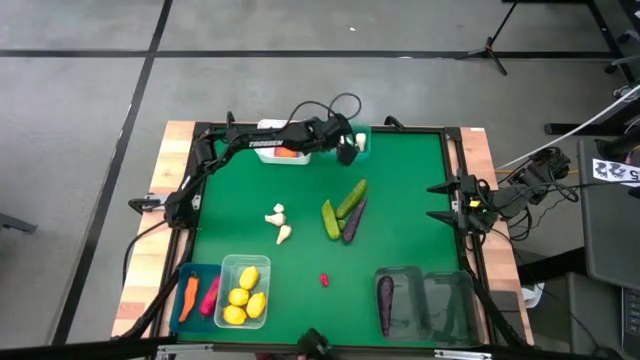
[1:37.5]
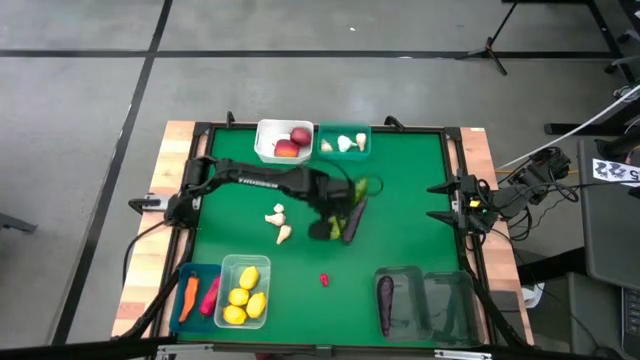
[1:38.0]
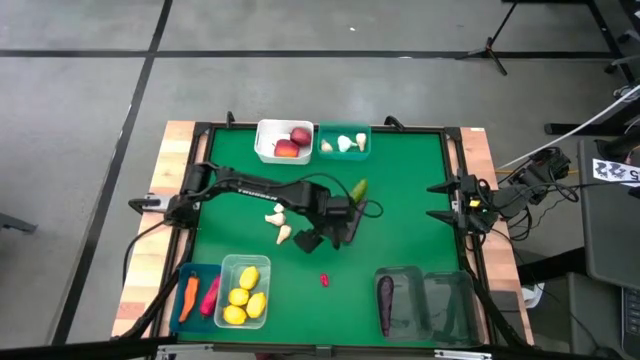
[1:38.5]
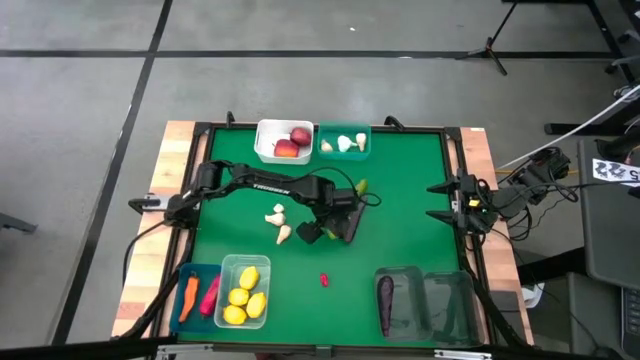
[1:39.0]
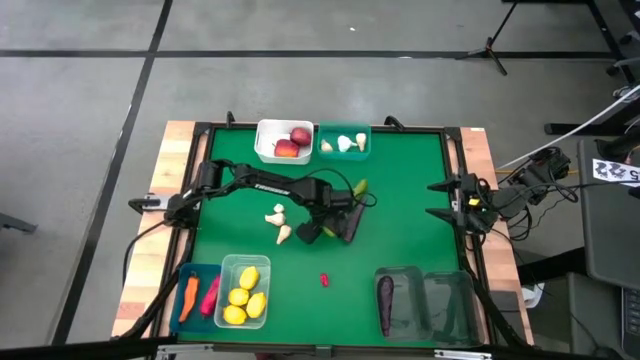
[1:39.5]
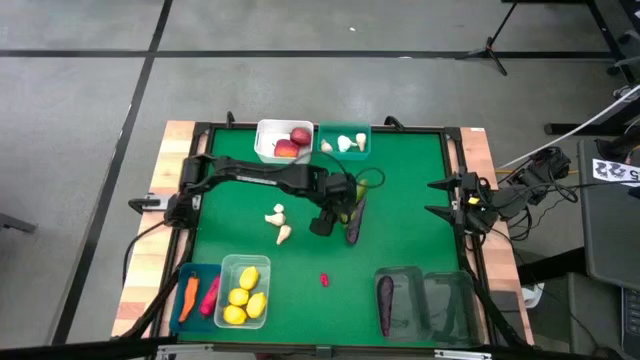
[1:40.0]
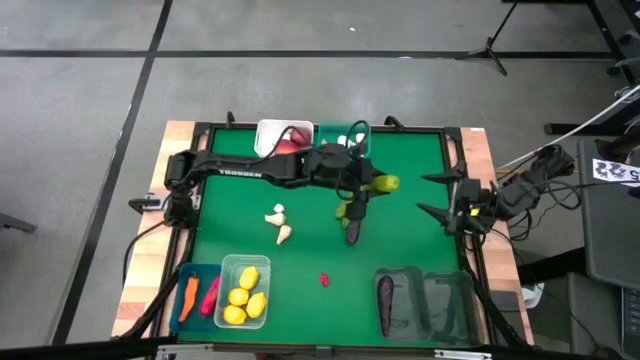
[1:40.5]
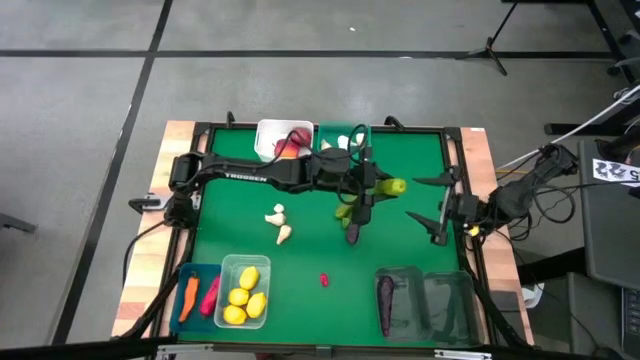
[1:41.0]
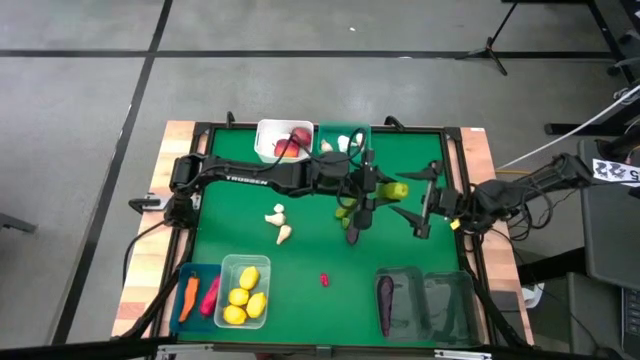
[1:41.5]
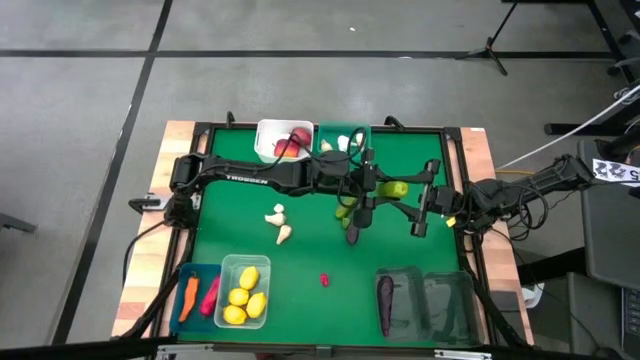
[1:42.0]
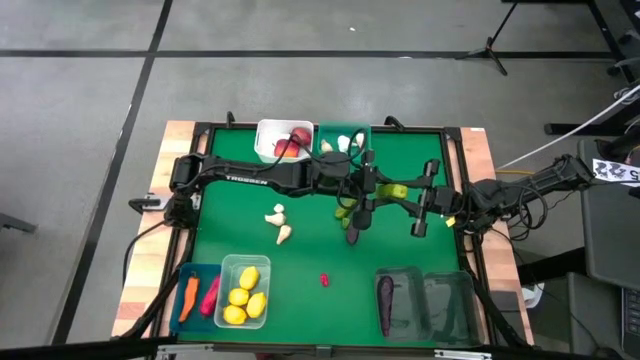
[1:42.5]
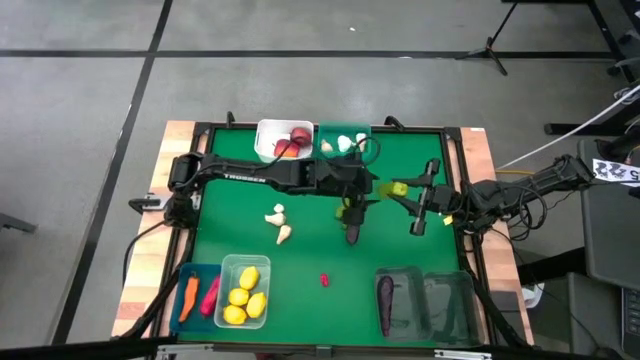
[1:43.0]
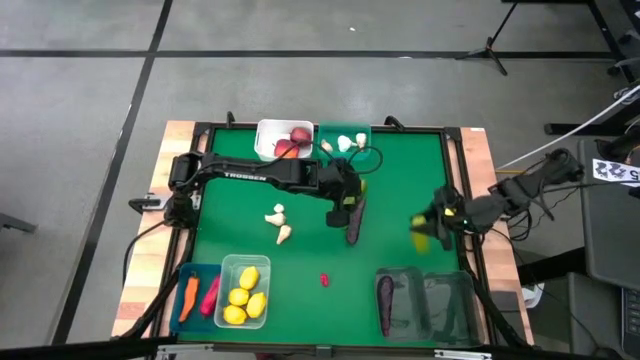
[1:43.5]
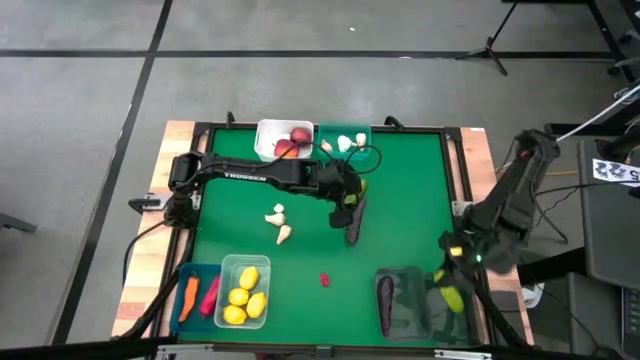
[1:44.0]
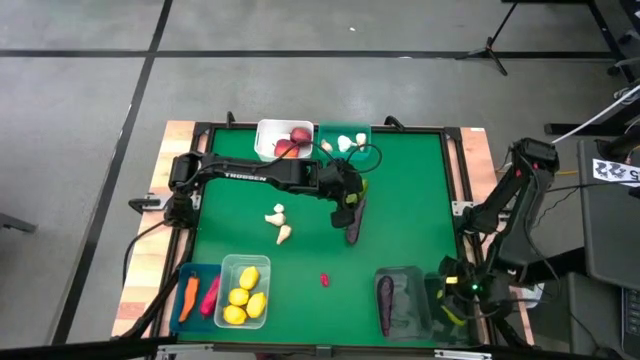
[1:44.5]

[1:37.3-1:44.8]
Task: Sort produce into baskets
Put the cucumber into the right black bin

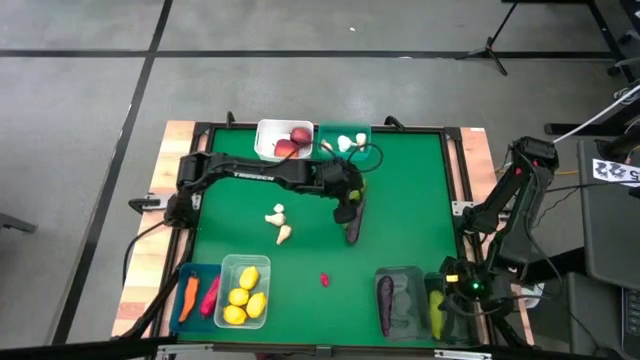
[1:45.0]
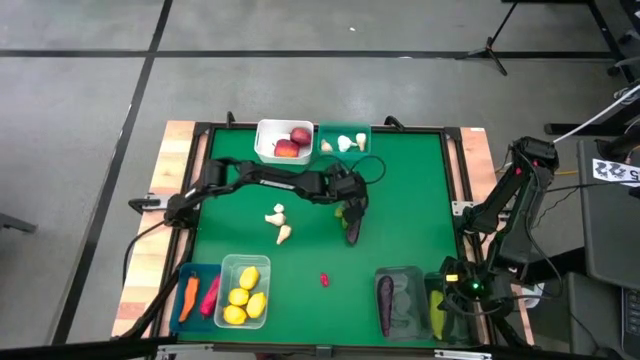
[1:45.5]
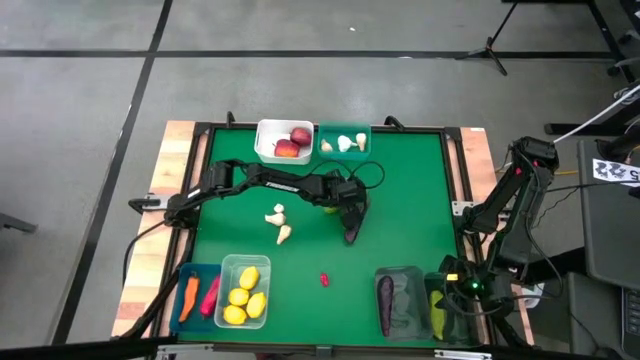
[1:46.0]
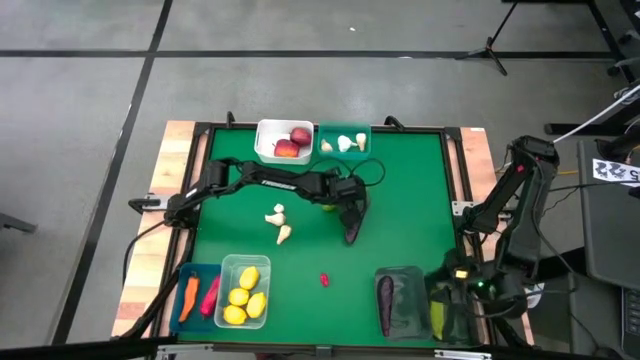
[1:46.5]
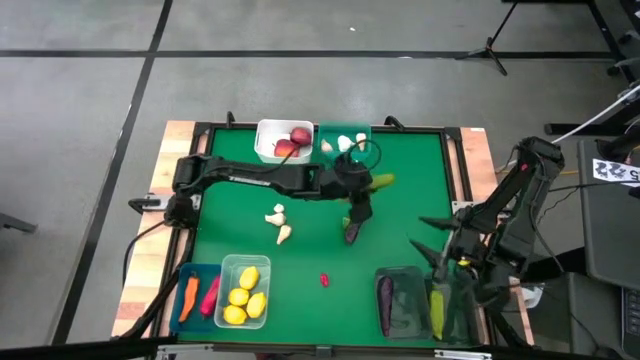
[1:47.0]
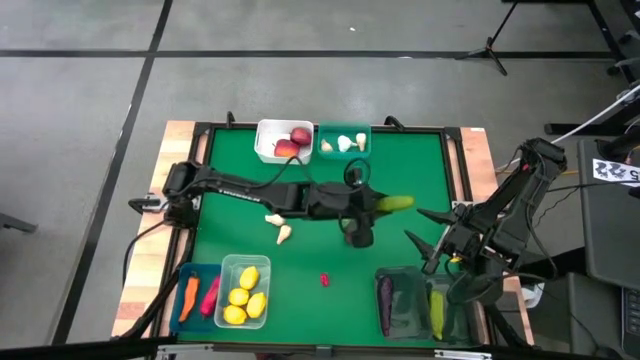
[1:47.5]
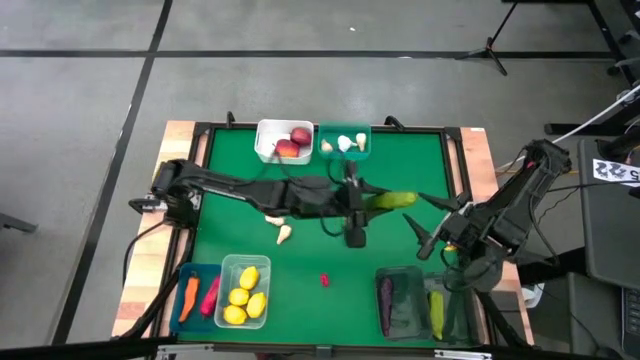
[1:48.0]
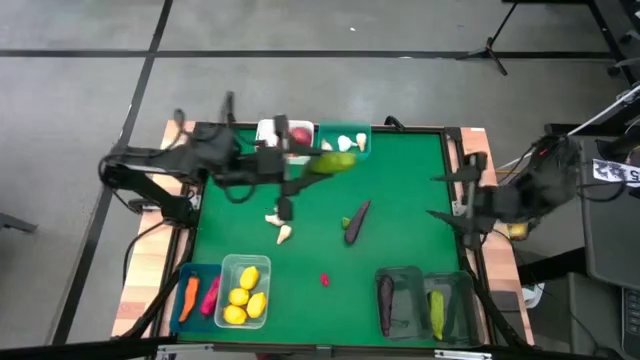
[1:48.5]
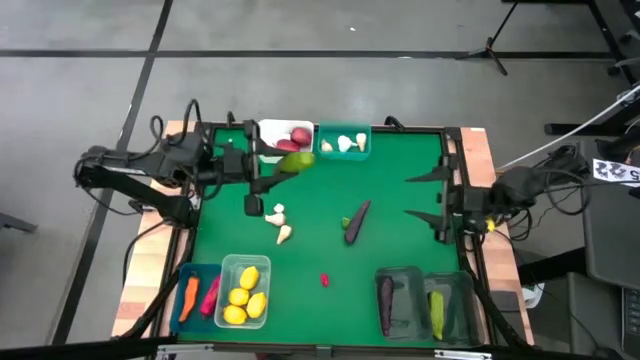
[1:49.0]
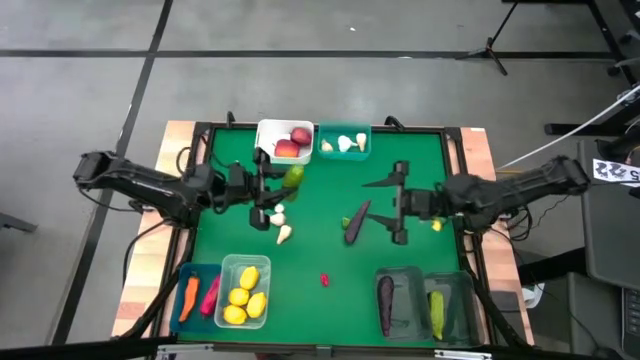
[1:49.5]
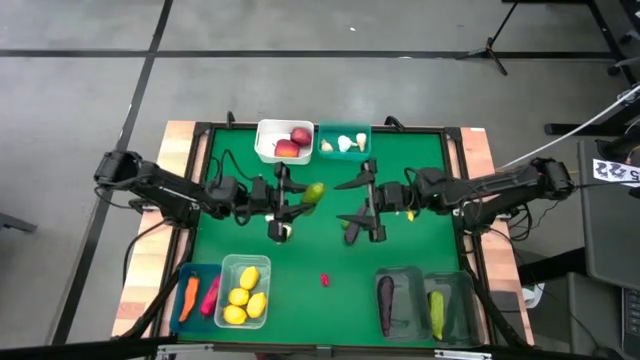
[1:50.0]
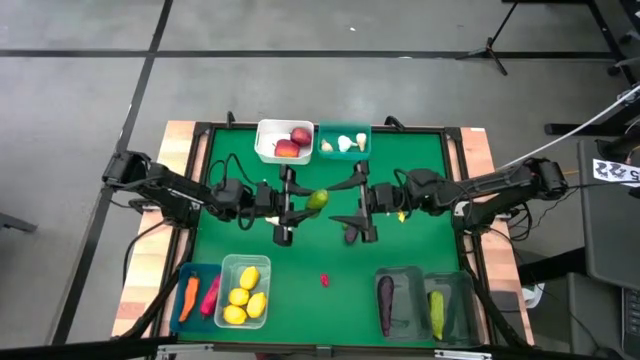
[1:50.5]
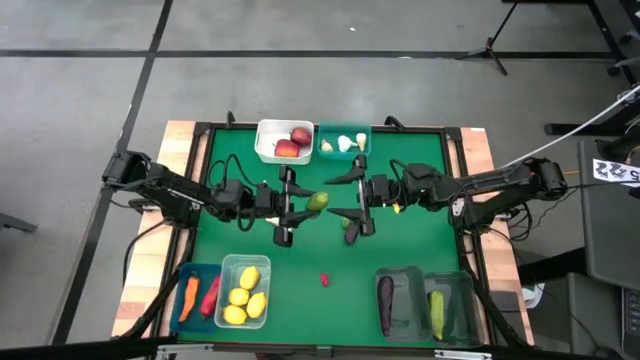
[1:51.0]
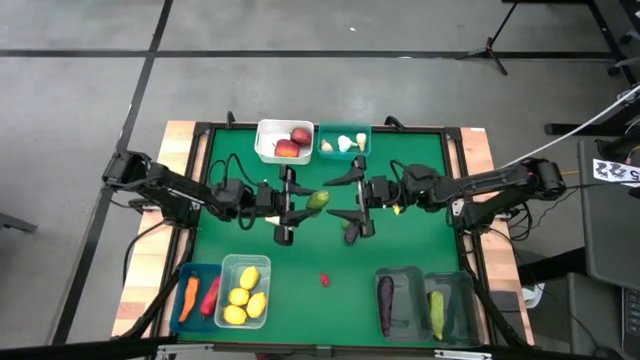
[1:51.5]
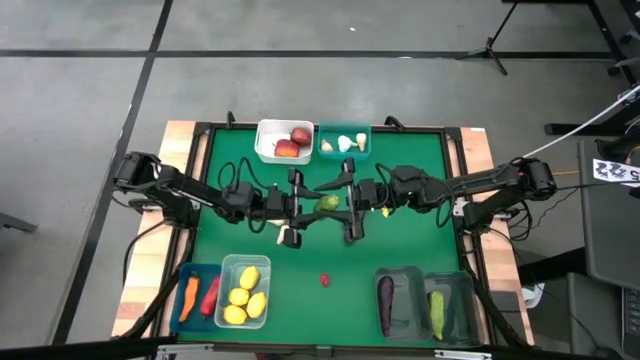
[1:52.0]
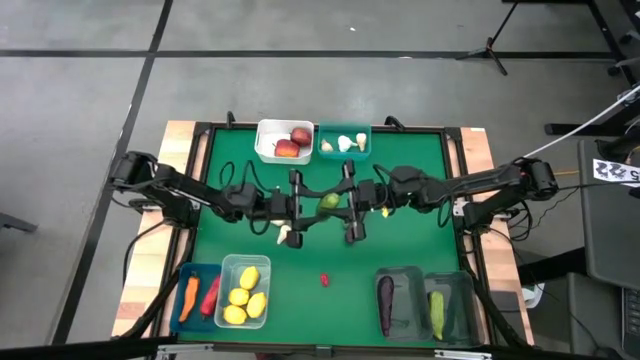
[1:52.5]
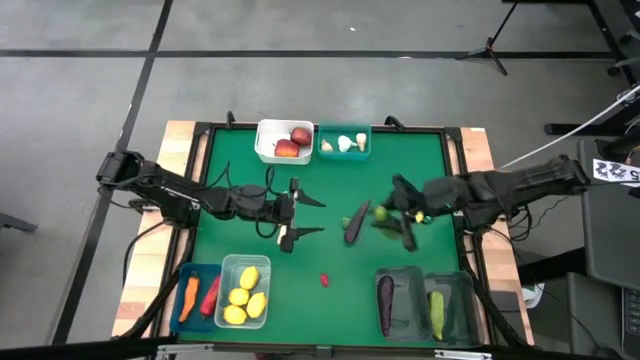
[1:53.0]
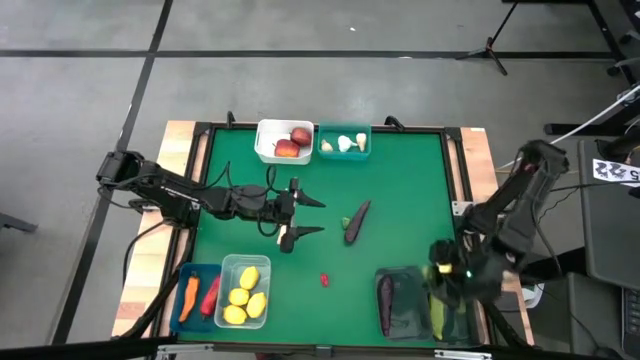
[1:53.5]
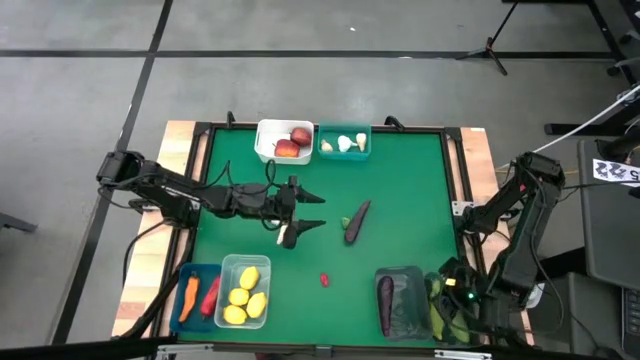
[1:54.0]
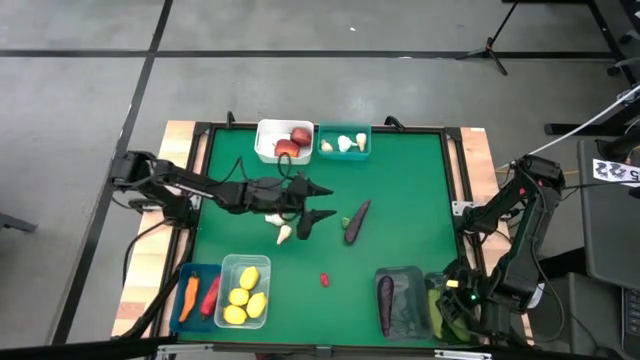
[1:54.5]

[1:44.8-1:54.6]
Put the cucumber into the right black bin

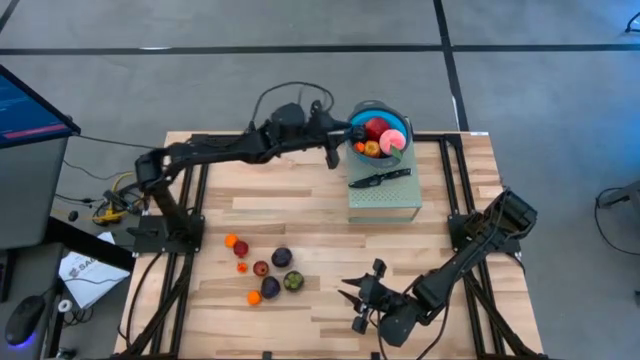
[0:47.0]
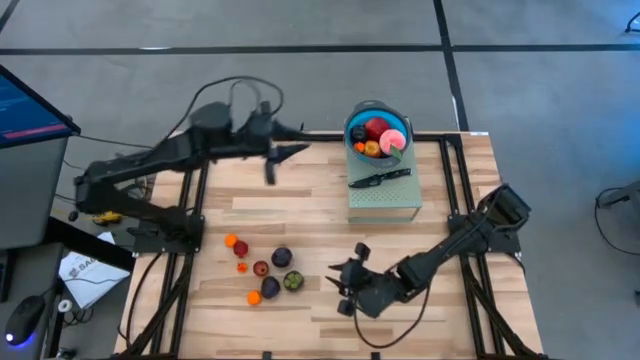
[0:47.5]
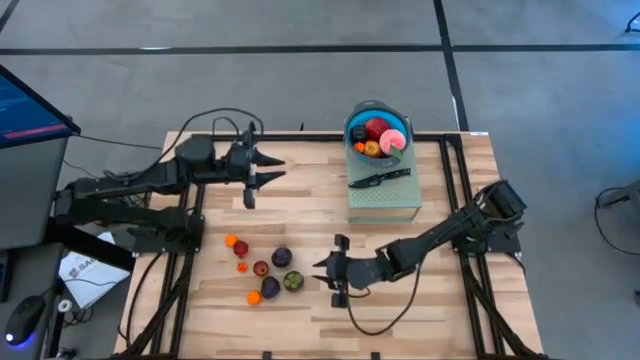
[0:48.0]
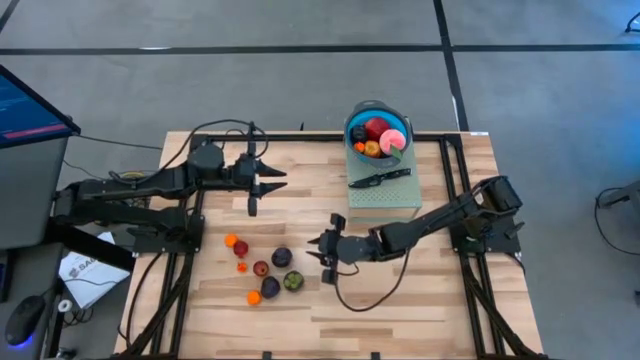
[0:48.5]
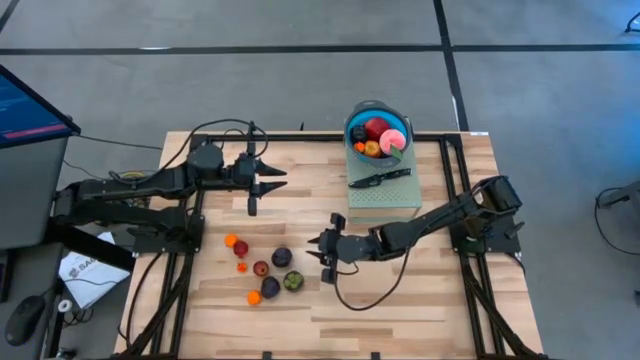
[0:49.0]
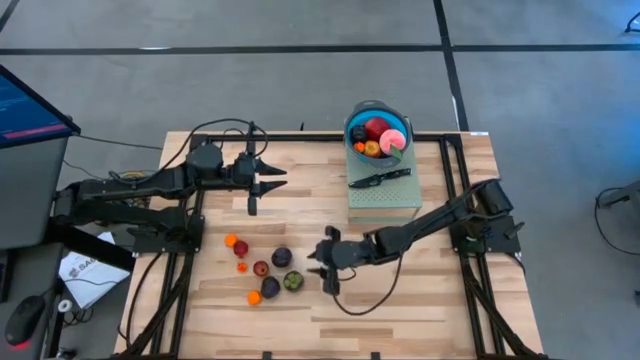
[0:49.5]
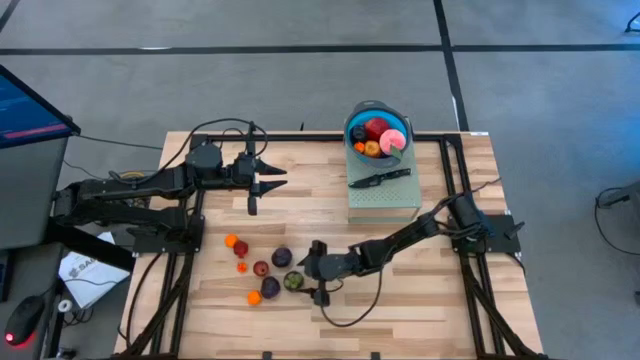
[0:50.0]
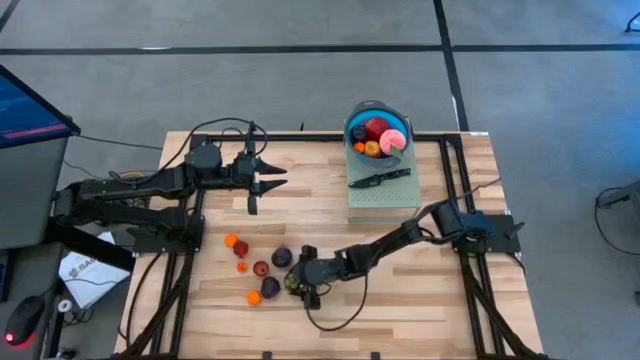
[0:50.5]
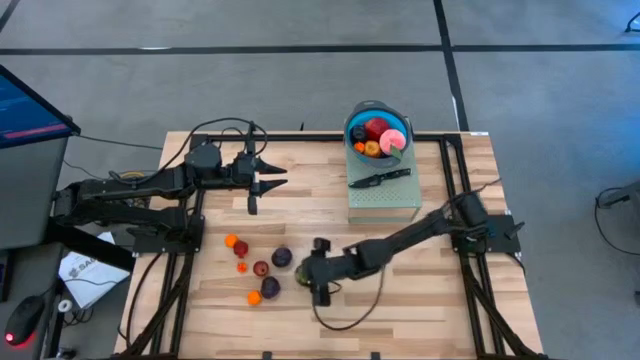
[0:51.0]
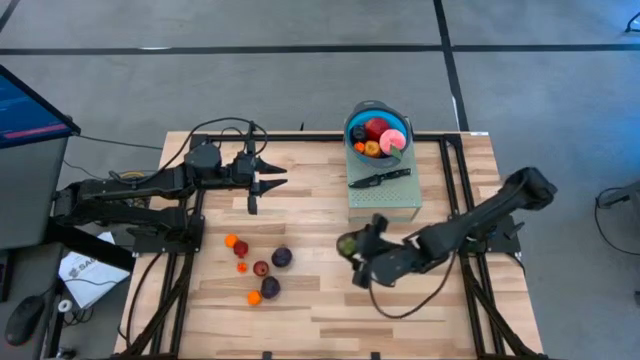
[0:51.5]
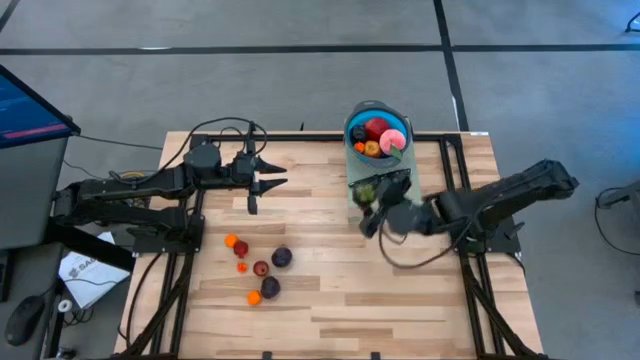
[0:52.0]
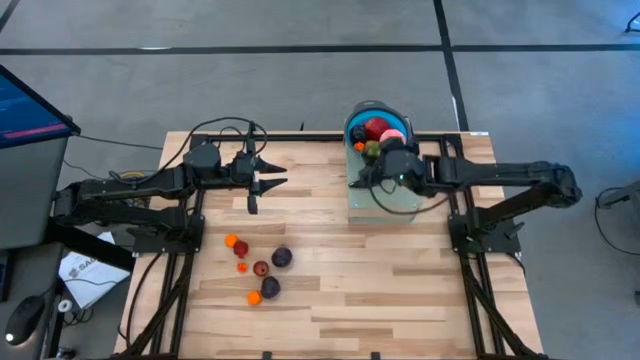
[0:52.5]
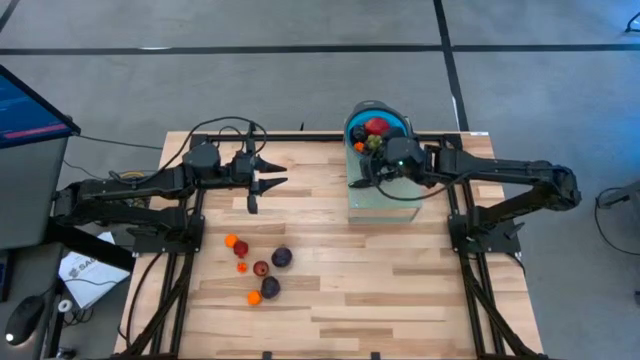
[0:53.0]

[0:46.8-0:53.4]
Task: Pick & Place Fruit
Put the violet mangosteen into the blue strainer bowl on the shelf
